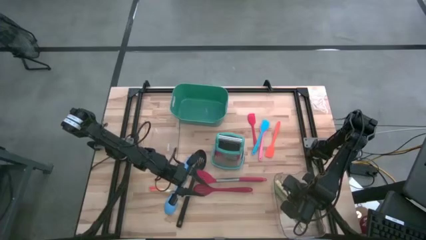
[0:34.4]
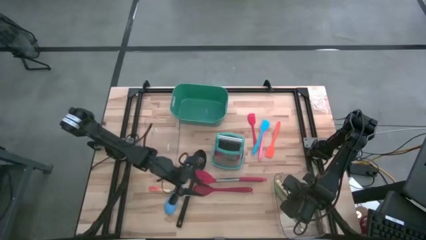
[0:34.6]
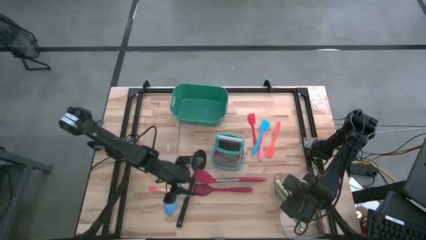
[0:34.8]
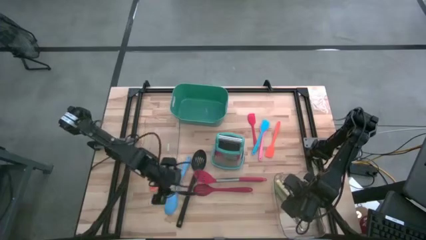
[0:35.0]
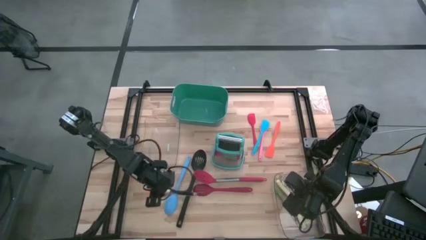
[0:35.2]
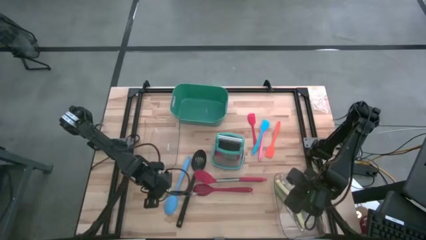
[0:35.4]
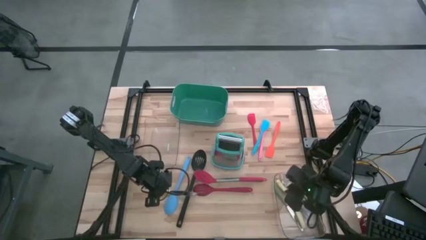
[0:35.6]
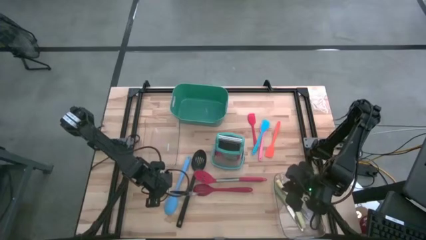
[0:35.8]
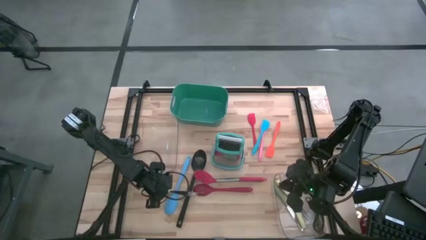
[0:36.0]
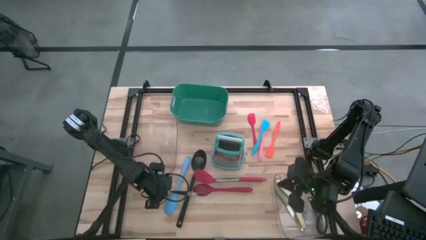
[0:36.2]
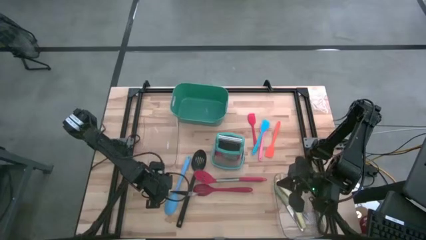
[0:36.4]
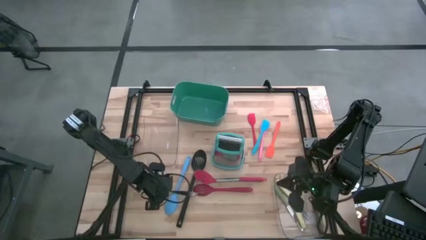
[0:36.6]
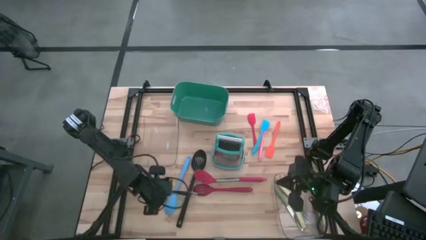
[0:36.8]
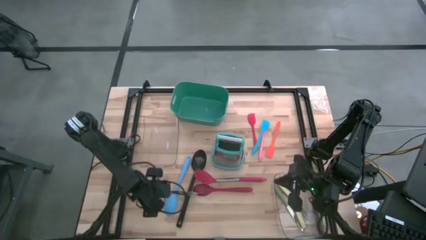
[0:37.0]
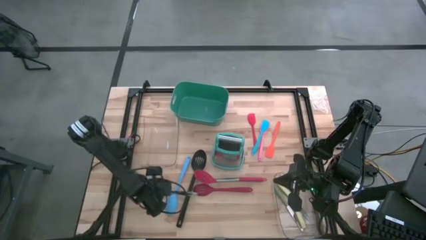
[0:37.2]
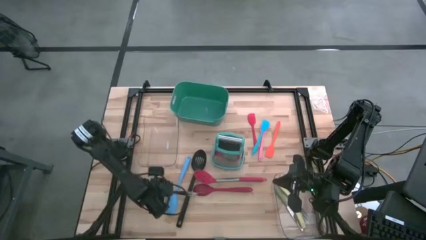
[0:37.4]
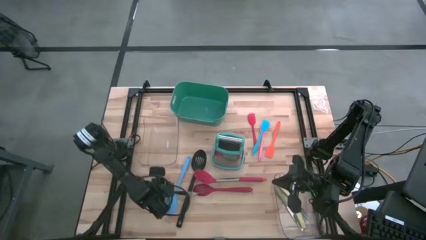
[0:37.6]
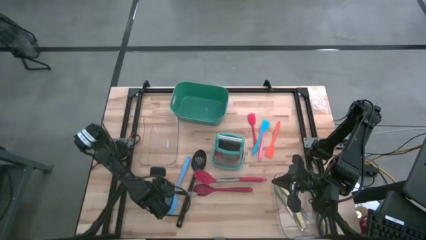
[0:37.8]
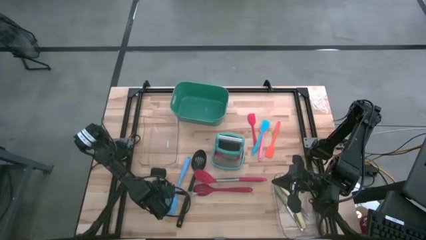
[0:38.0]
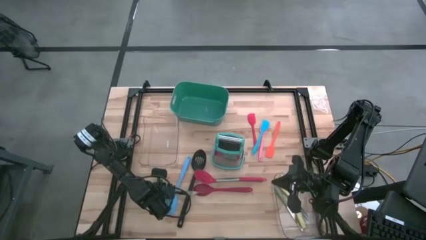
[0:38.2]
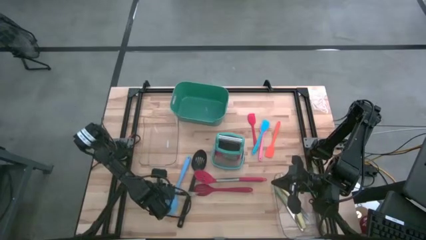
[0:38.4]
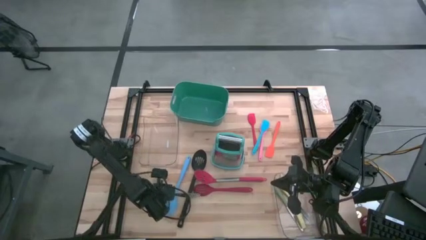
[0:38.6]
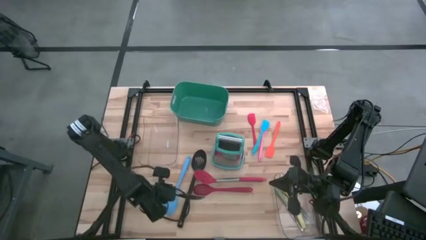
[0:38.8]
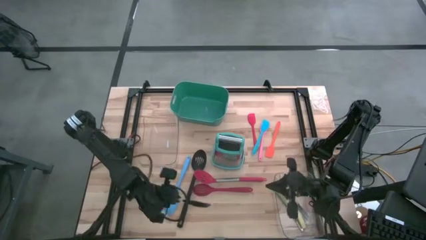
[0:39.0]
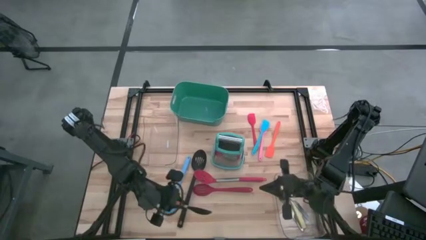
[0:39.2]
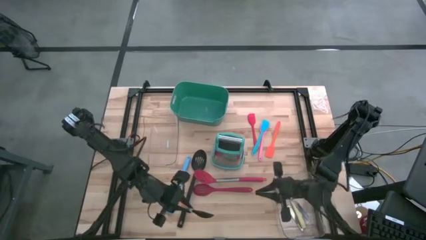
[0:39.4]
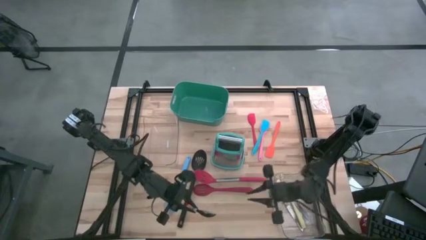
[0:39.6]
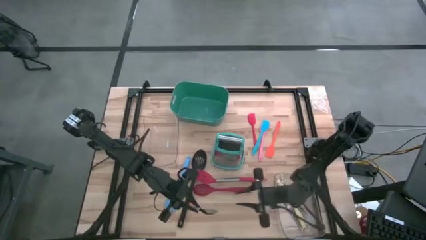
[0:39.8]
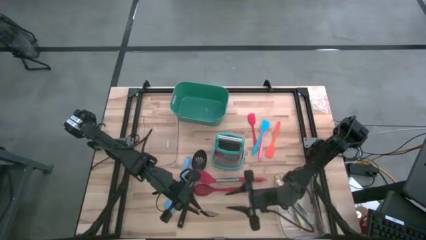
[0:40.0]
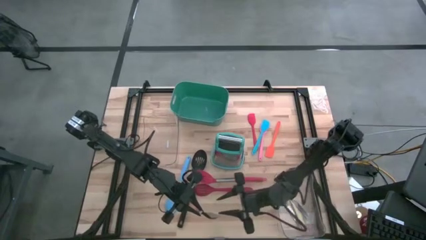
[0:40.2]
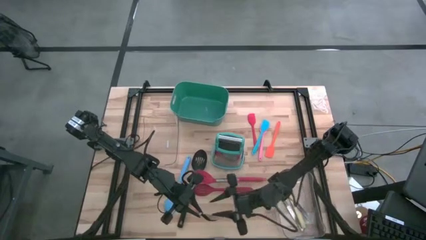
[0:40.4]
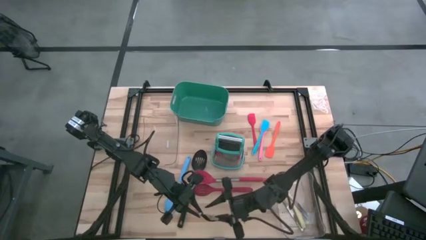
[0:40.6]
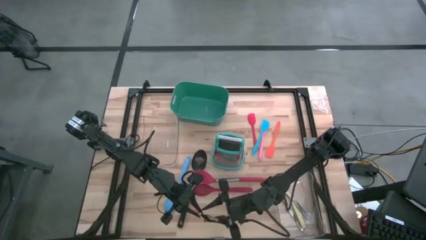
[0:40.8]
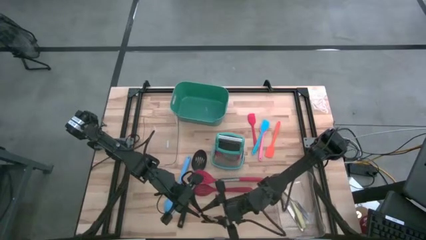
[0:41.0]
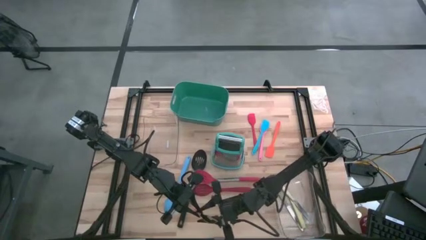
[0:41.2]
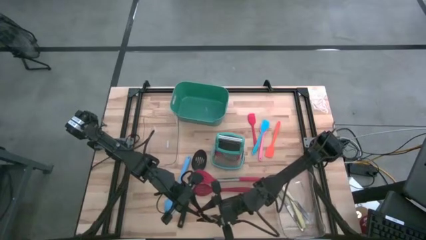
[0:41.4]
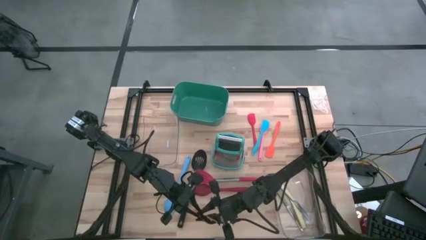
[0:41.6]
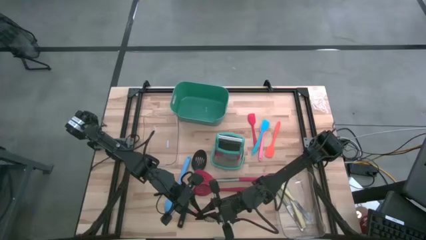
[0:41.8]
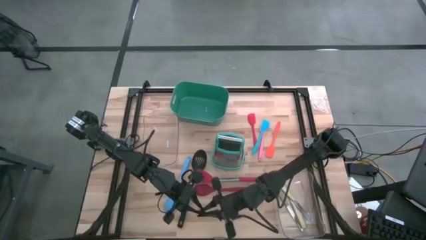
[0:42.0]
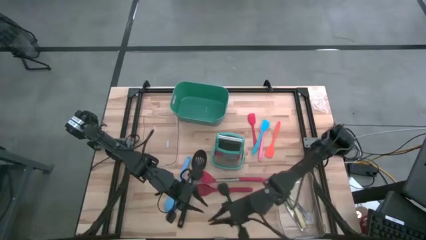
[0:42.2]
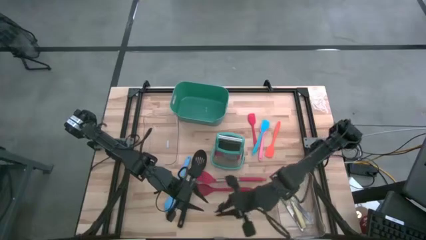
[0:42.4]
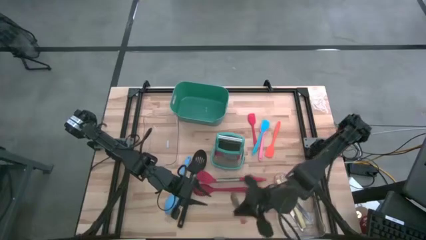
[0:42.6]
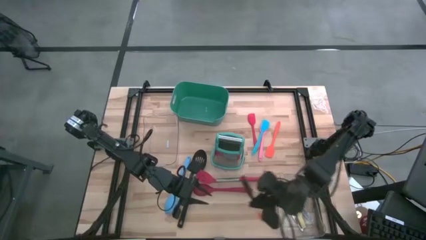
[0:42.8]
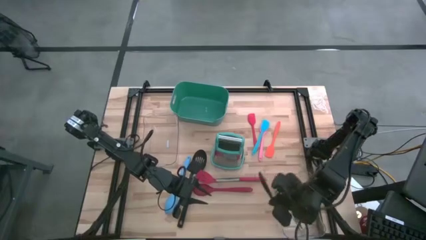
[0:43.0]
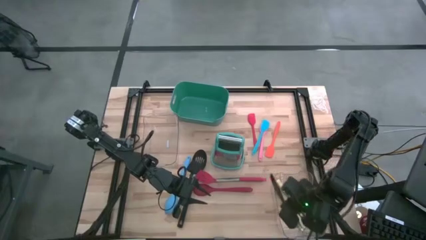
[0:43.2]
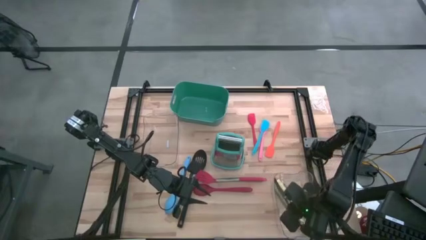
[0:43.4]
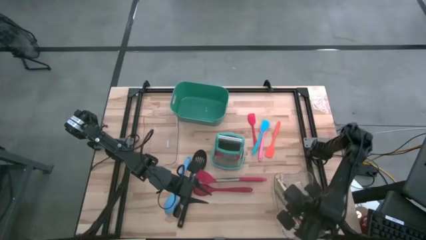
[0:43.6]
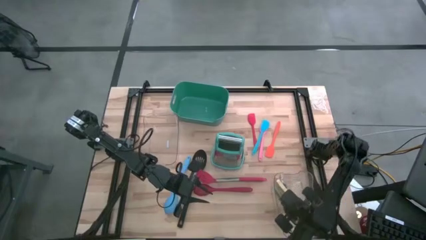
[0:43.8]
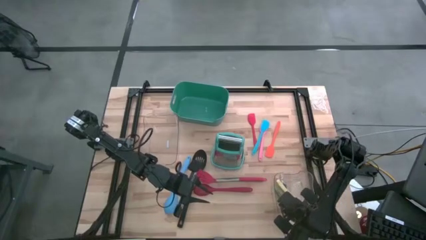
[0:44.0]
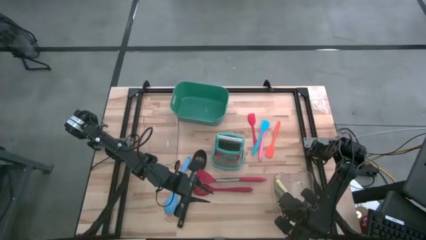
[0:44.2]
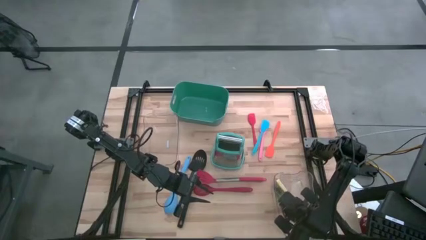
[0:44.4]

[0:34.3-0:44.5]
Task: Pick & Place Kitchen Items
Put the orange table knife into the bottom transparent bin
